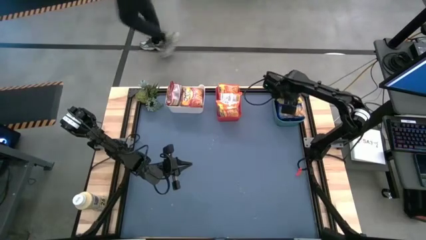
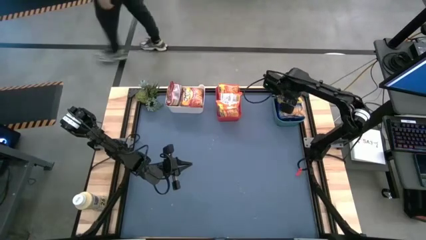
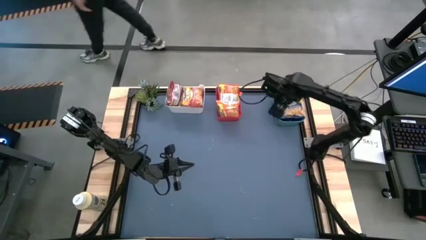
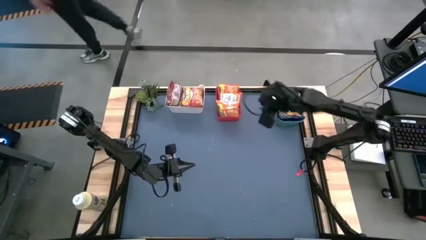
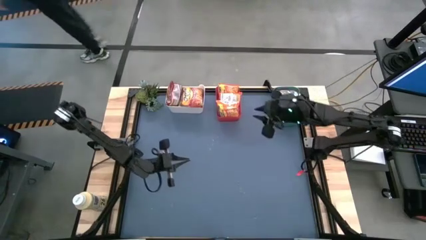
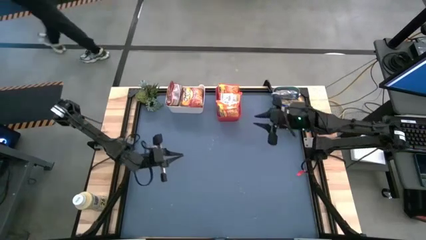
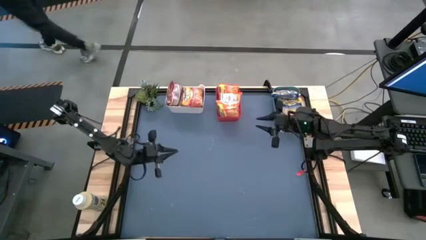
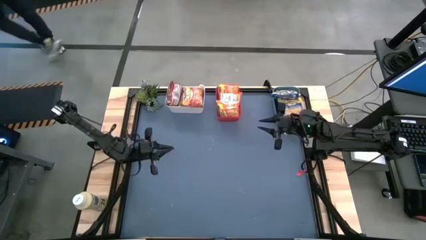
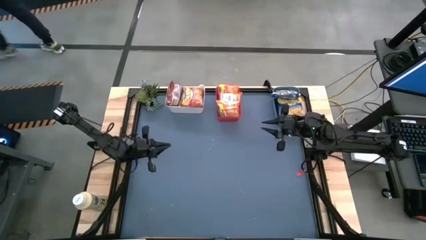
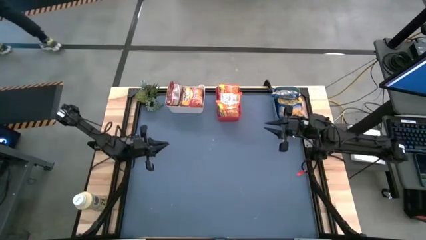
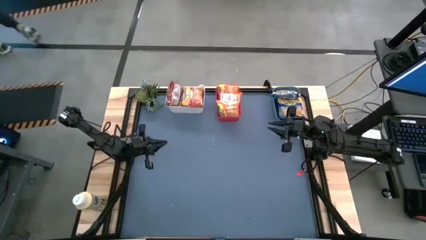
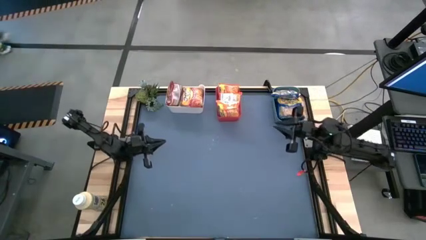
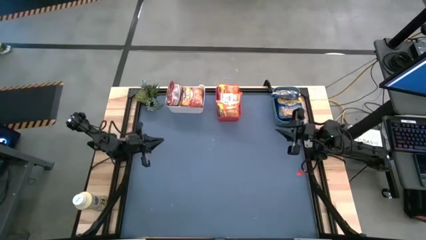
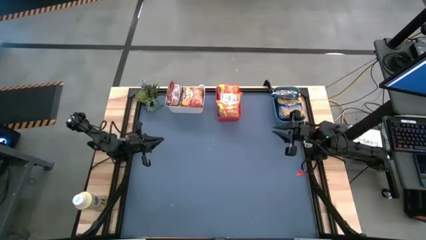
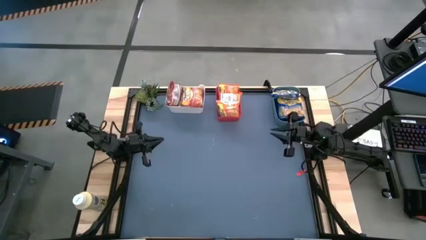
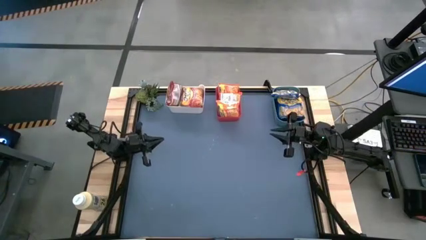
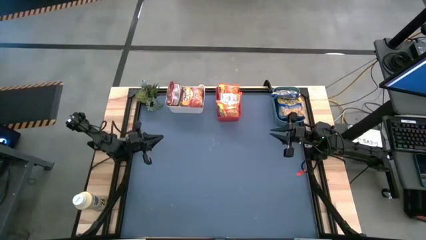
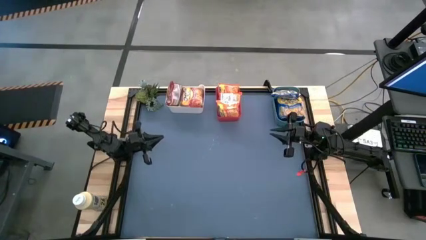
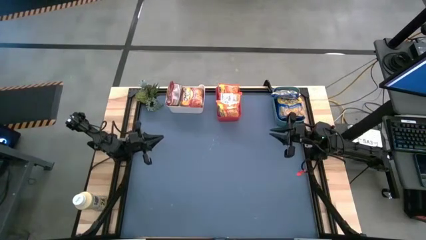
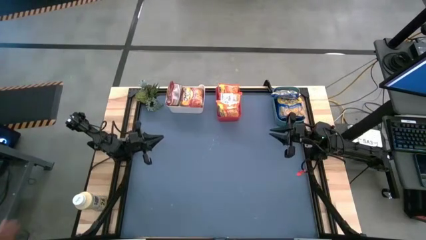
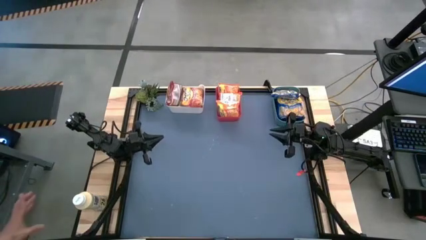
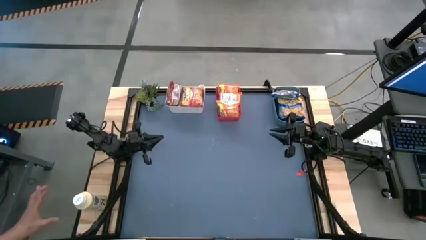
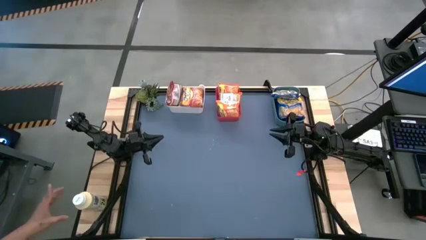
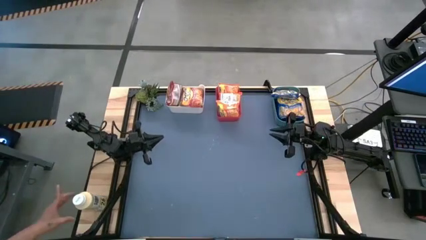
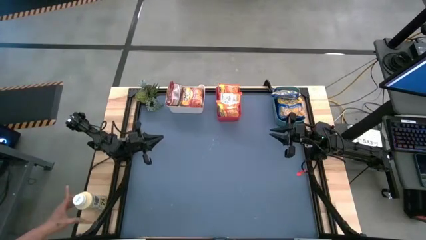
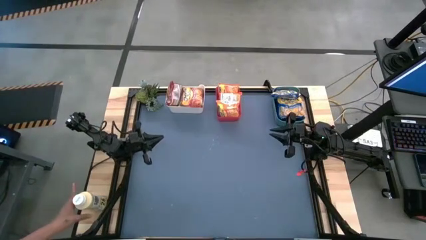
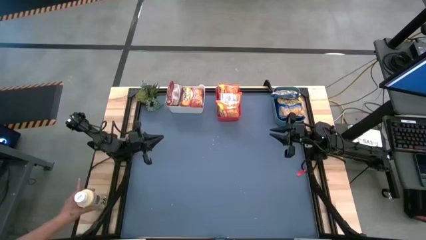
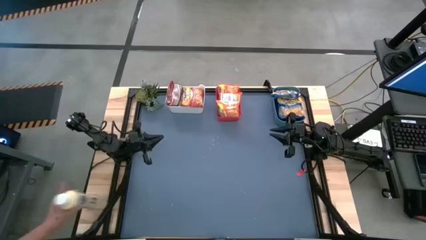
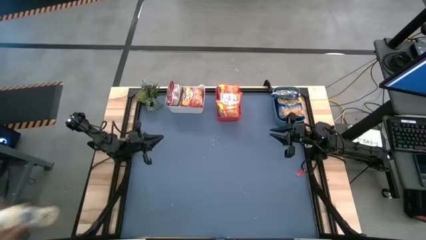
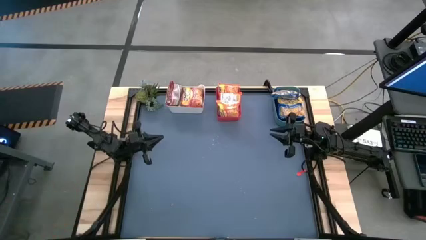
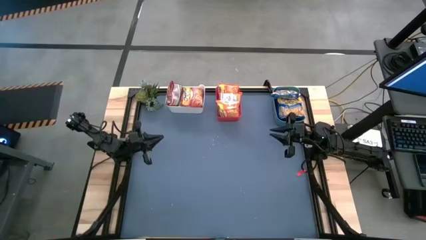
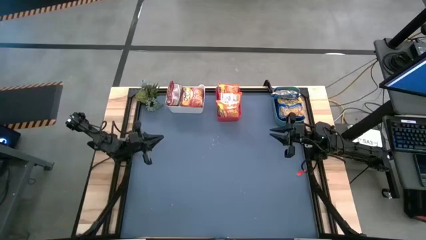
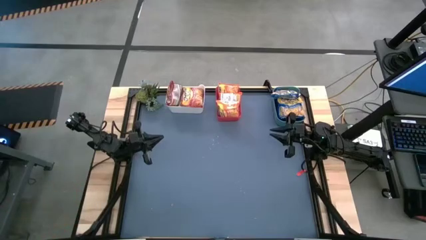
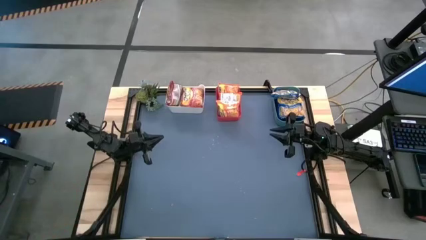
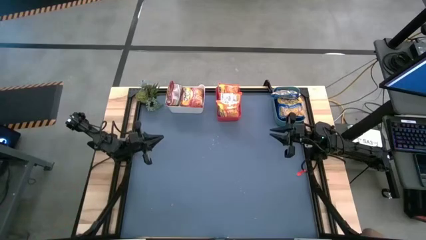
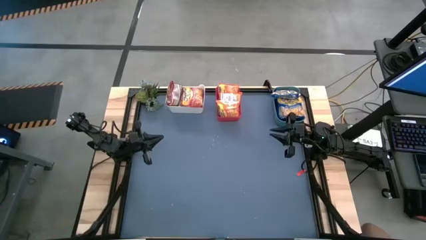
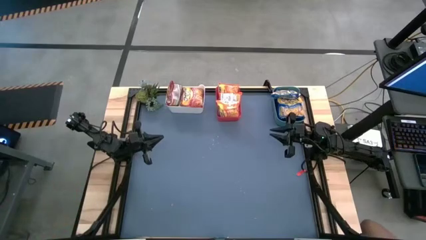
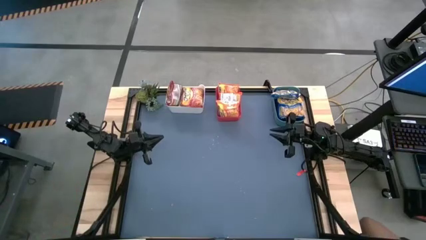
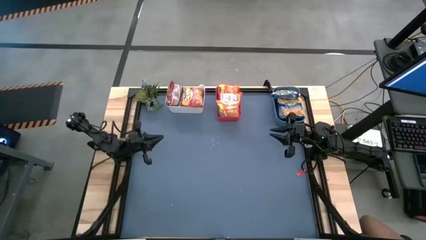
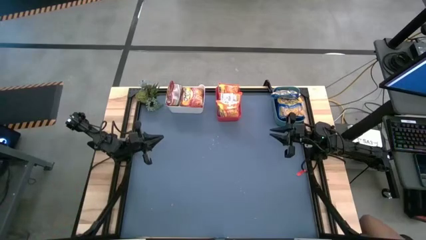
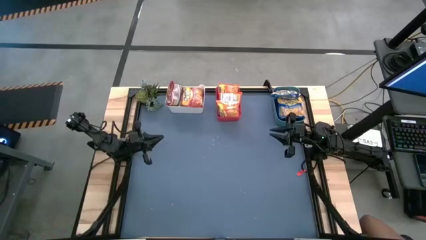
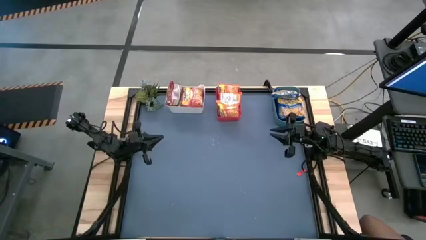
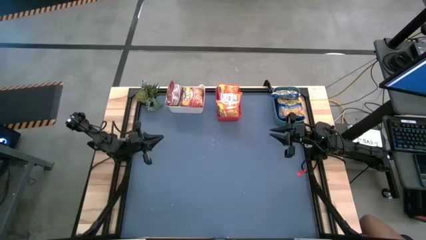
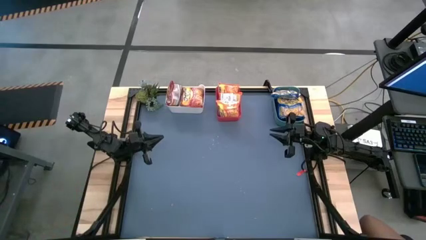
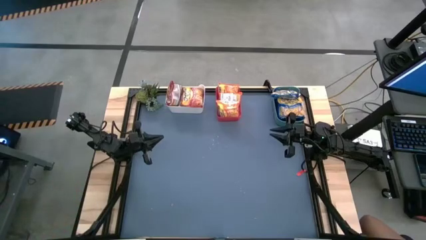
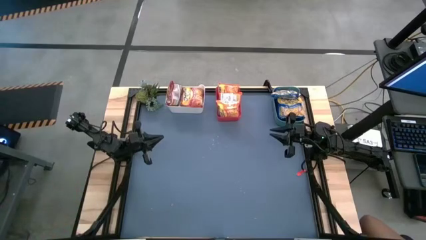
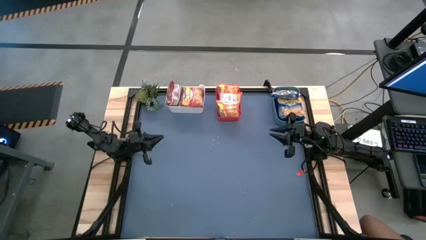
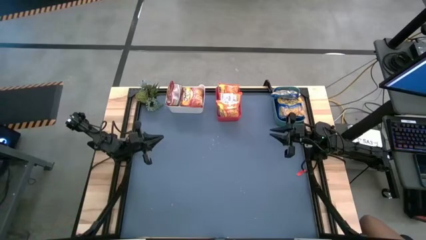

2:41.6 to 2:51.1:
Task: Sort Maruchan noodles
Return to Home Position
